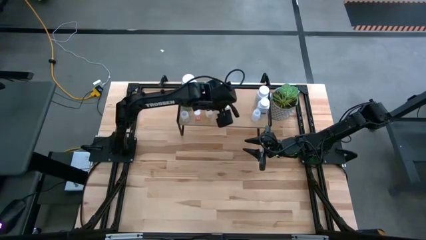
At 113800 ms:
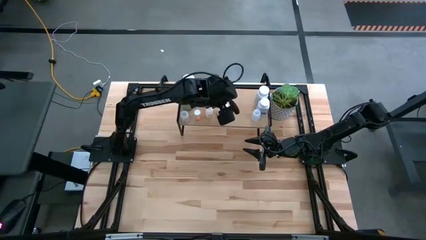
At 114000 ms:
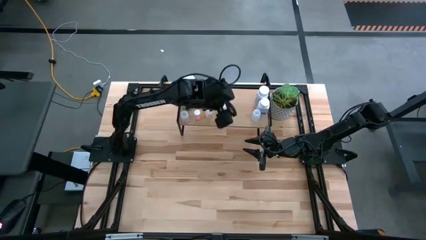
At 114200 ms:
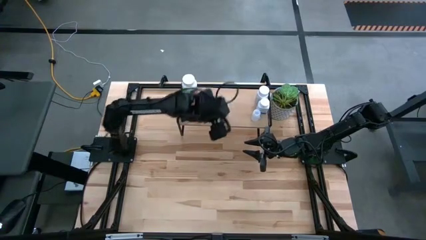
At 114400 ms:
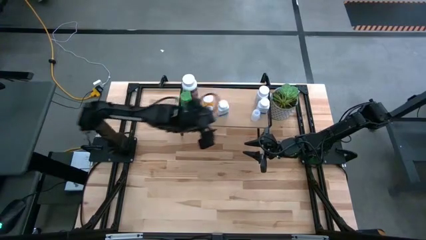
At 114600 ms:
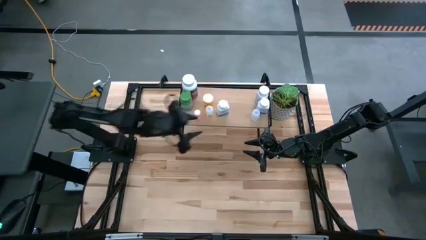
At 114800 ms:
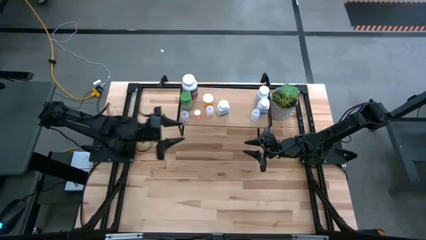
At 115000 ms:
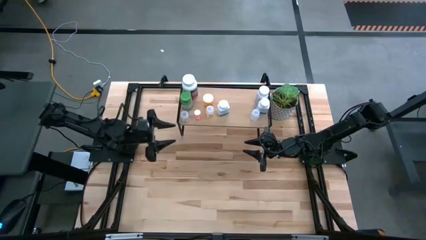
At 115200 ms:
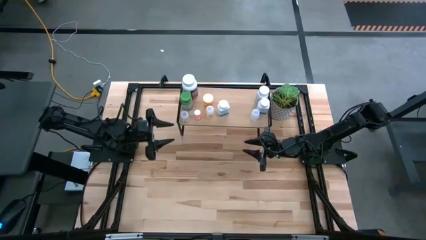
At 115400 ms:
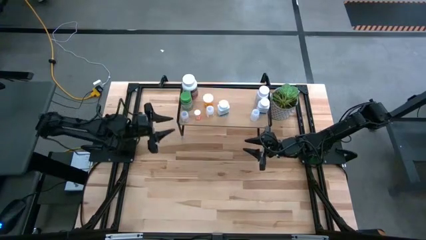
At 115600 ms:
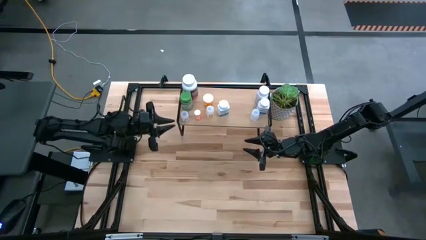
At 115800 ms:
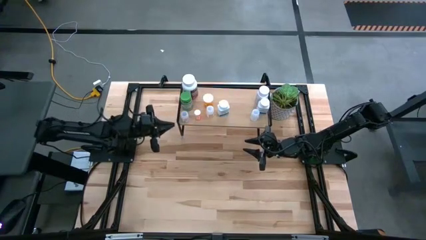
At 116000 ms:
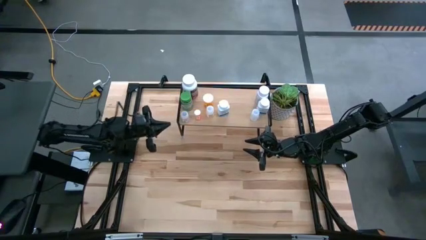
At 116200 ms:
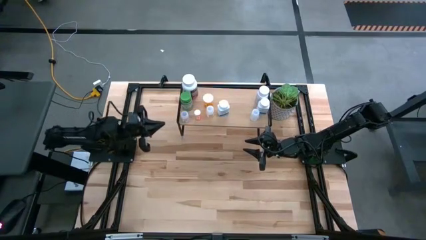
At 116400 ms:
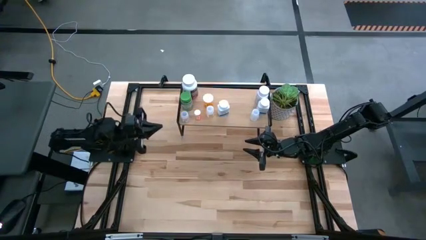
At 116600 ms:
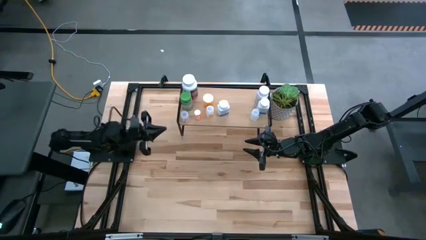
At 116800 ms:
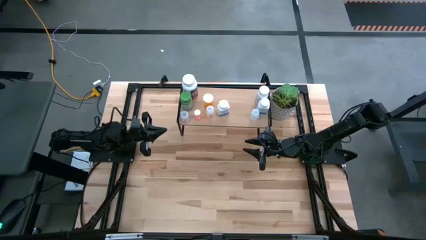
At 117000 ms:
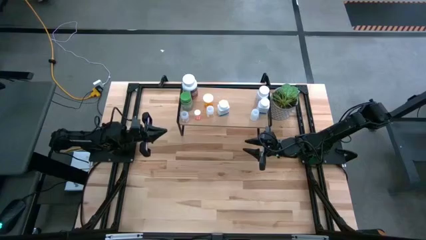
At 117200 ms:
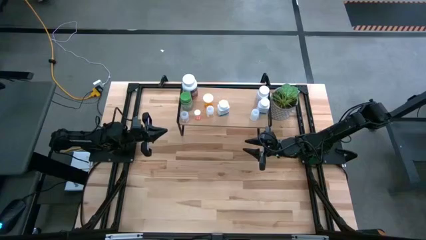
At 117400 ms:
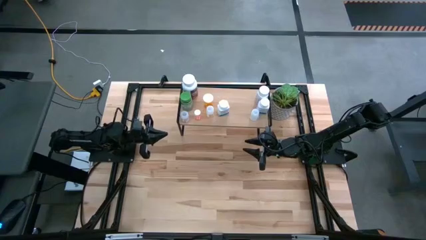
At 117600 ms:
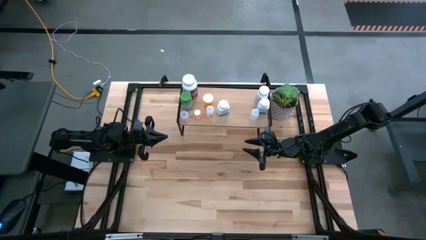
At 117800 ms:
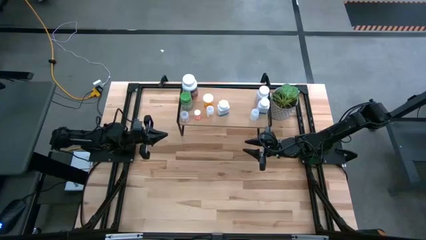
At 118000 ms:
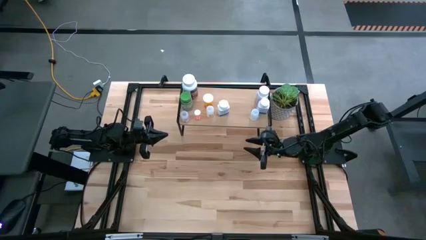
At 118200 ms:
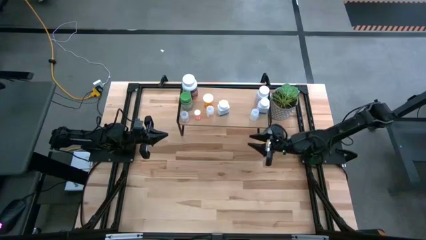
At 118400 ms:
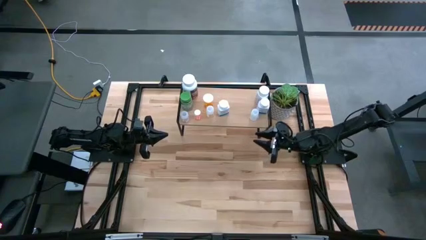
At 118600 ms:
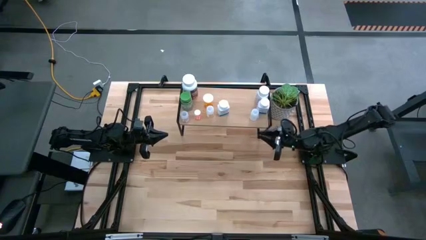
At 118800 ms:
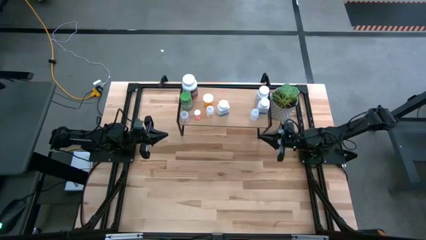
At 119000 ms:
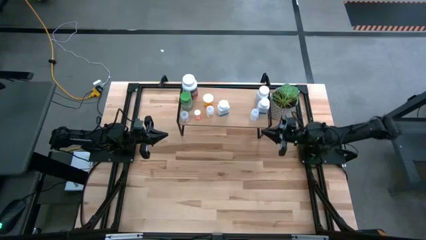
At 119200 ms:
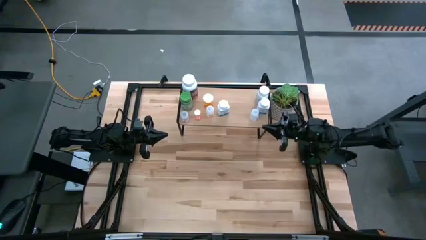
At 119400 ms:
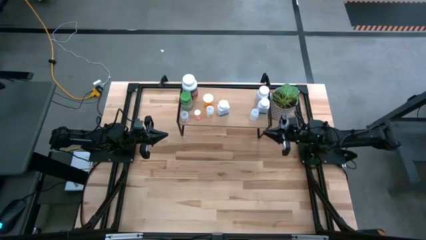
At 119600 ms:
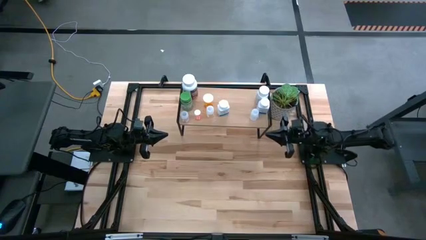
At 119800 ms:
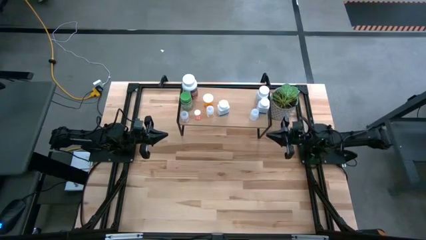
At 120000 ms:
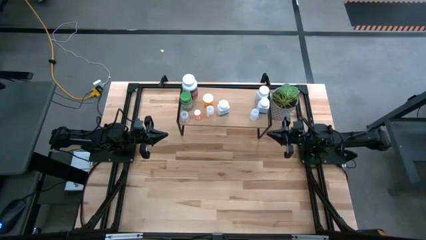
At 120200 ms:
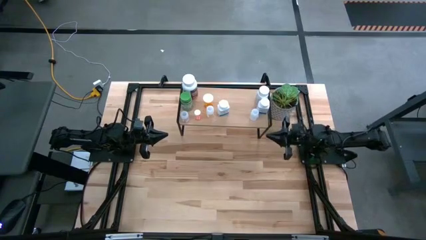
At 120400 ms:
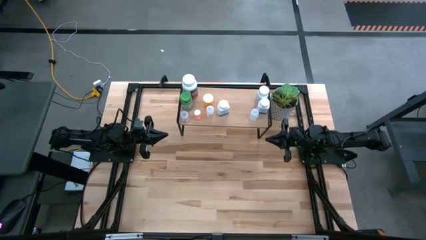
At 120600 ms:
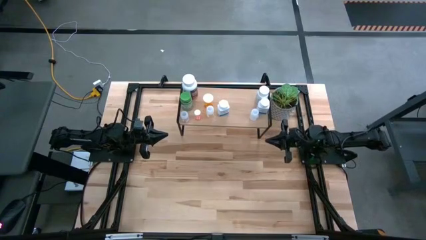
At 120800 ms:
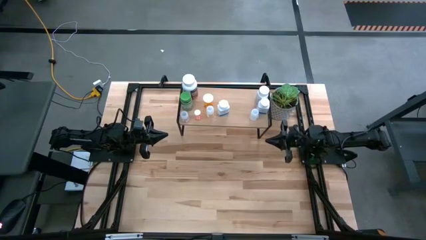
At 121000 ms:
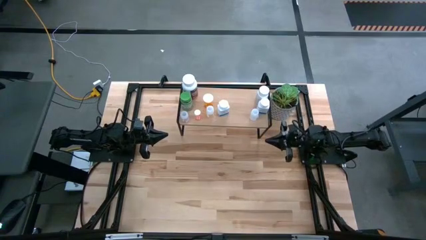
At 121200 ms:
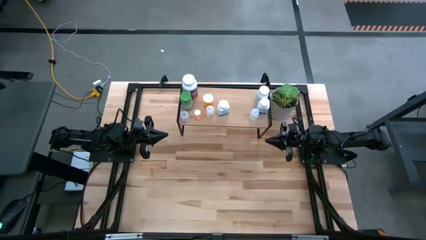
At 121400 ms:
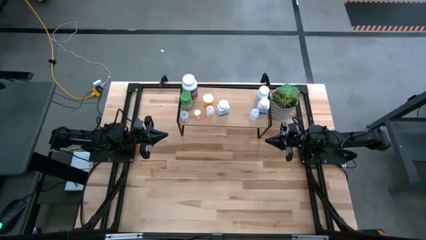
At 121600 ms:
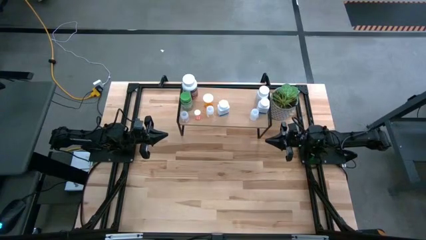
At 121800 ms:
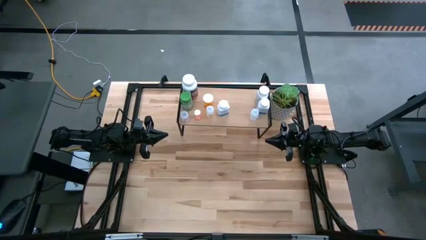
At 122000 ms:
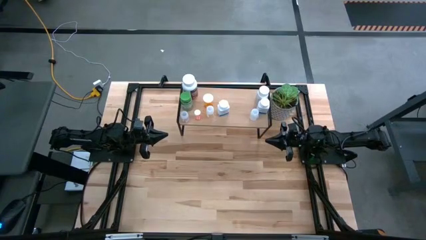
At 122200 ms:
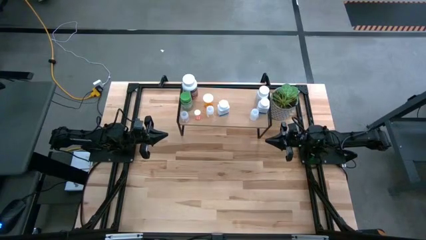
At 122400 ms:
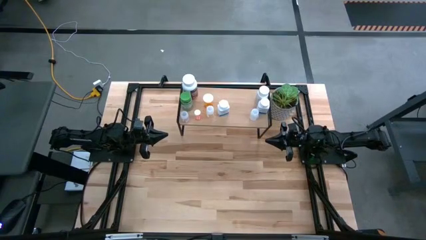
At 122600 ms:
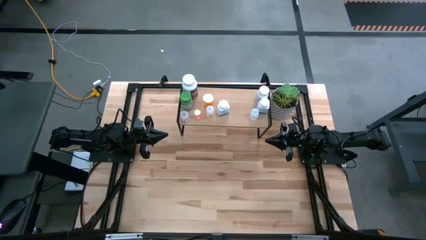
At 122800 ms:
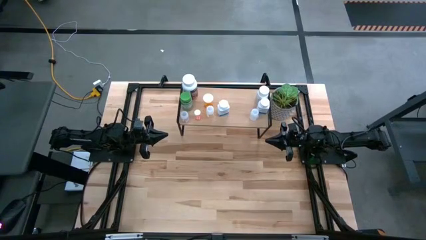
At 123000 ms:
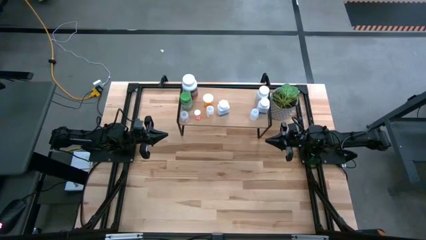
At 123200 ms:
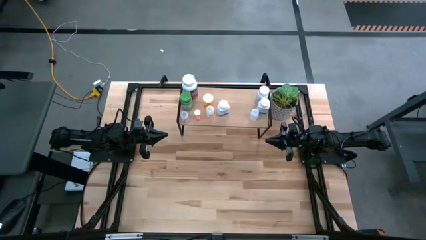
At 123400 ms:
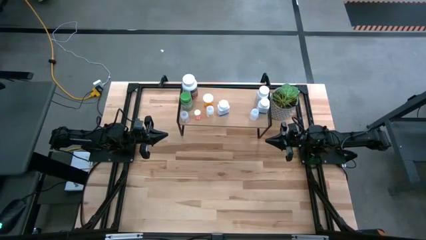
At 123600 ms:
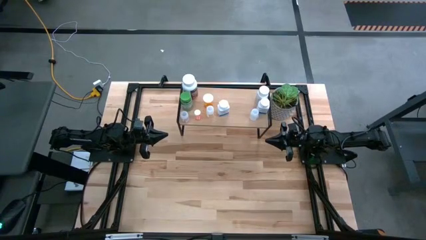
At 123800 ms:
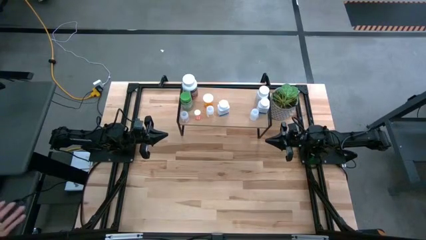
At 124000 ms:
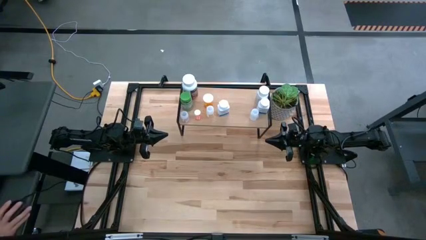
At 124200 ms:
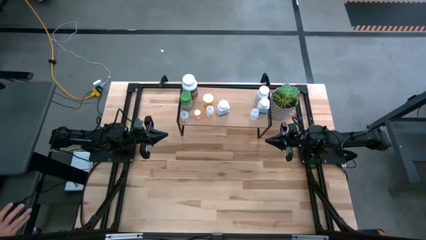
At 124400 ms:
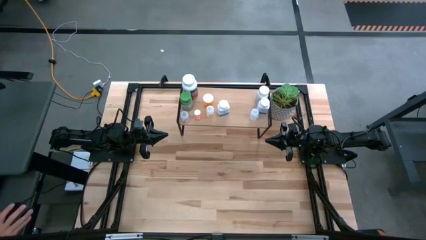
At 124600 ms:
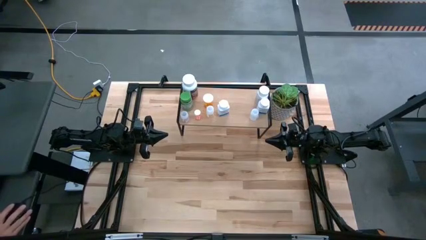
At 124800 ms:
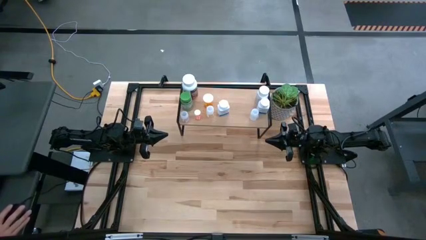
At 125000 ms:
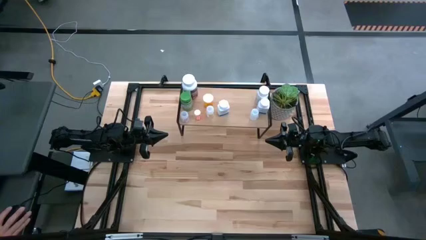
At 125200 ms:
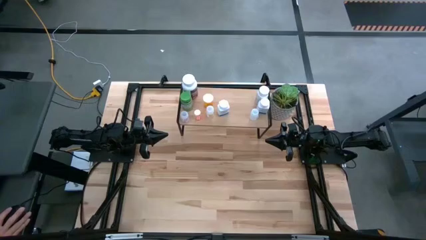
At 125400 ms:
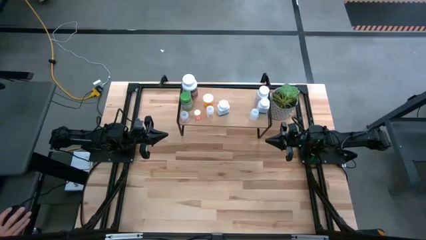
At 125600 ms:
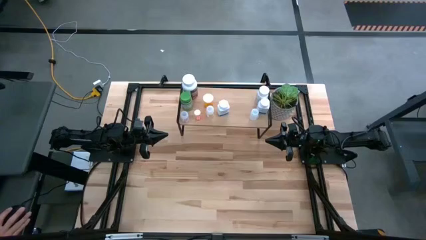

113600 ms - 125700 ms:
Task: Pick and place medicine bottles onto shelf by color
Return to Home Position
